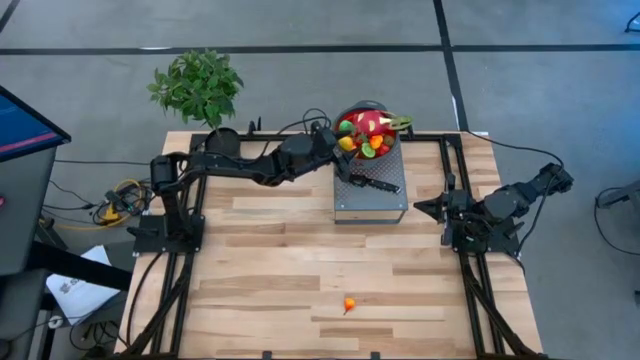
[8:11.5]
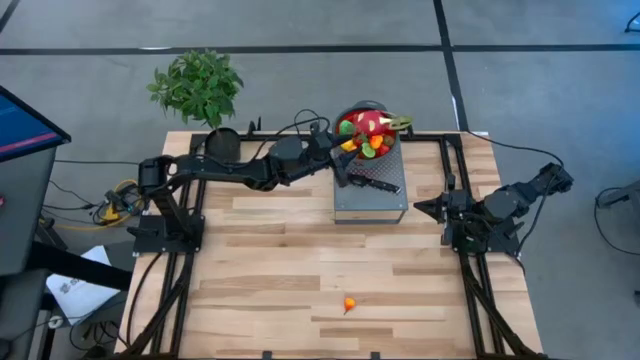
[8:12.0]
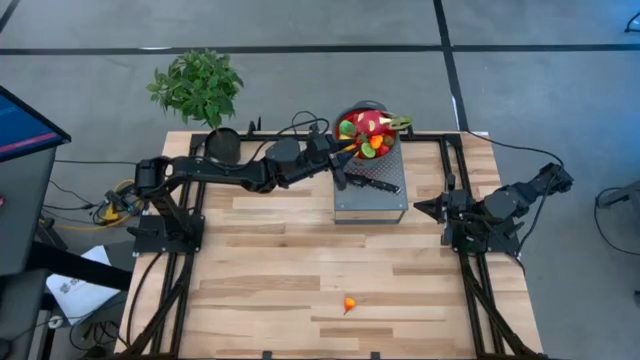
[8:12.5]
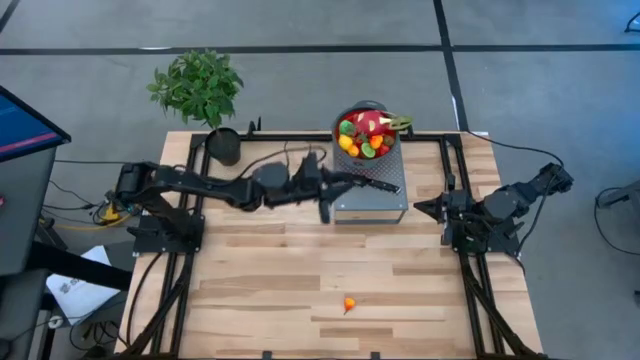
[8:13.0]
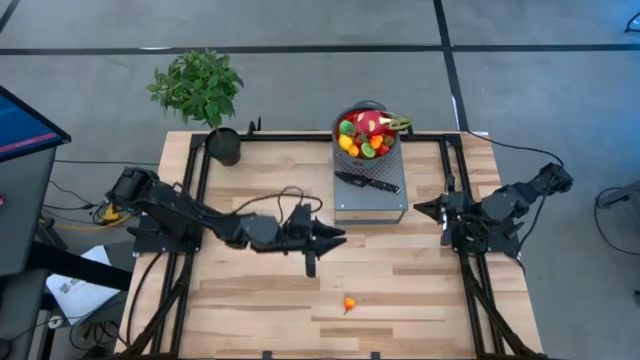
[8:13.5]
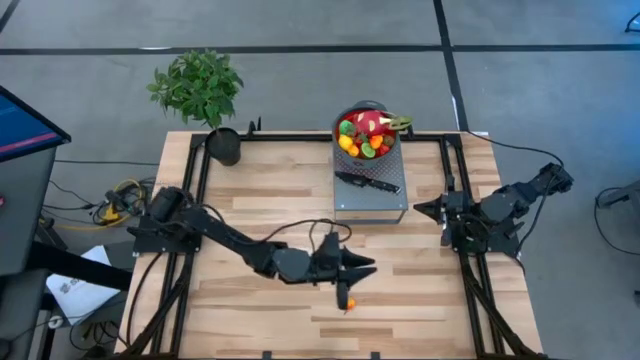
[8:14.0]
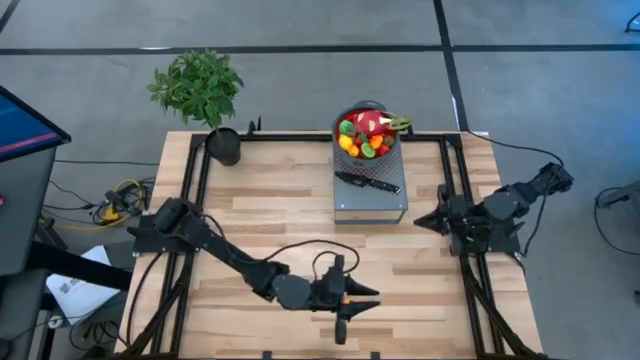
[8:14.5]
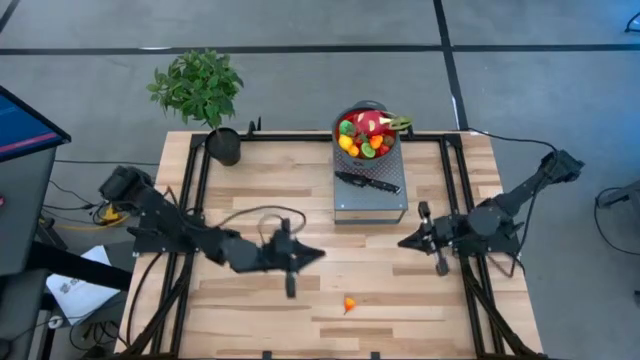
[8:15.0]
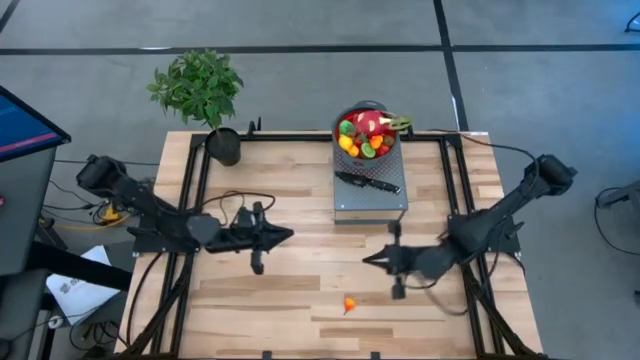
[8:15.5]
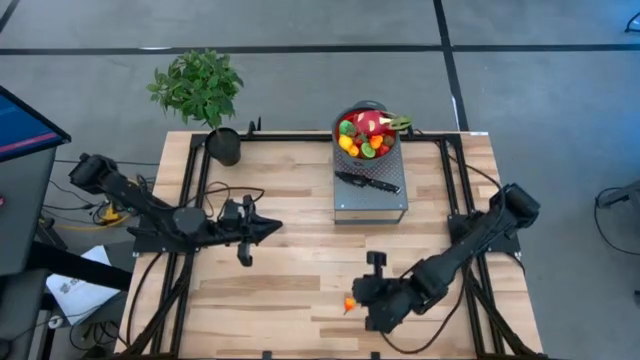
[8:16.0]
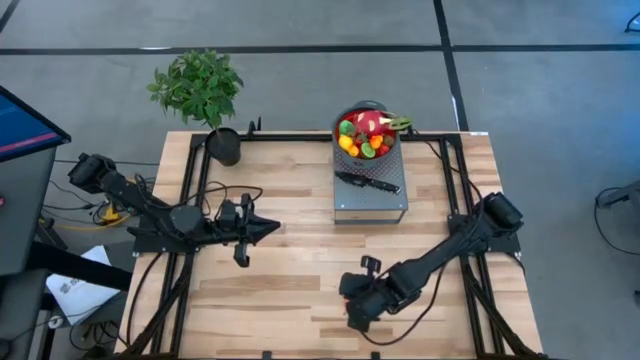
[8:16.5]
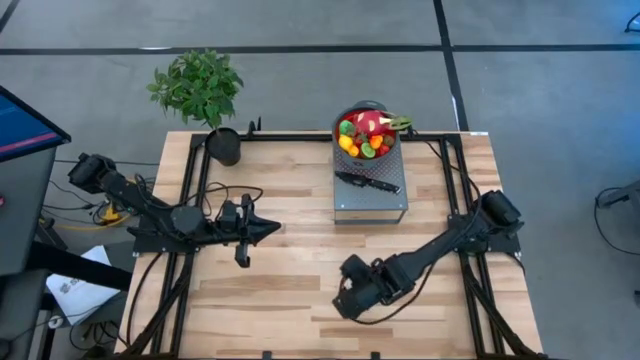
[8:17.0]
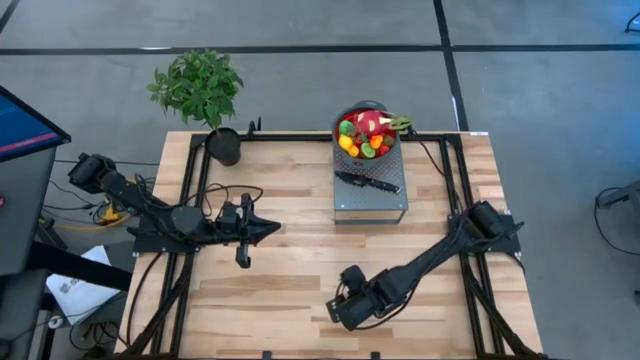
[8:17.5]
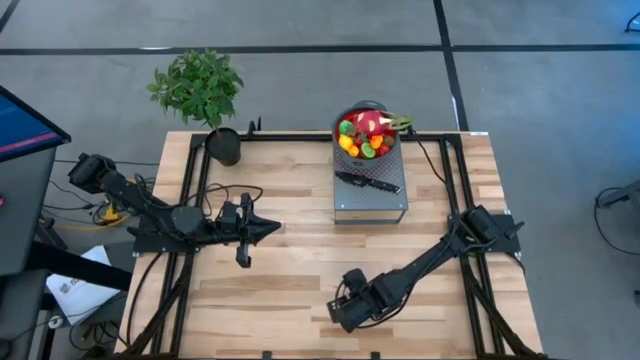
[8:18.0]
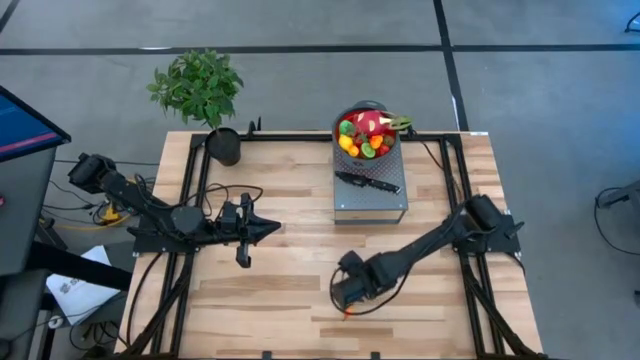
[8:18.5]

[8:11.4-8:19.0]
Task: Pick & Place Fruit
Put the yellow pear into the red colander on the shelf

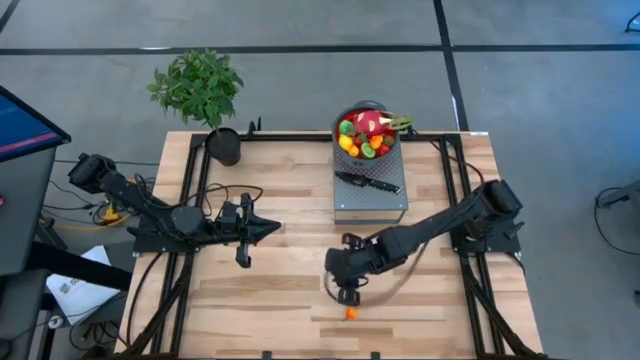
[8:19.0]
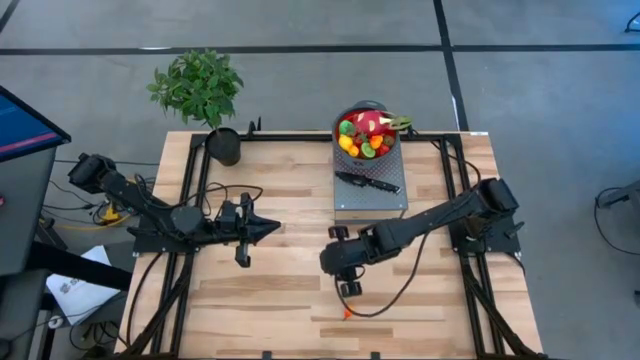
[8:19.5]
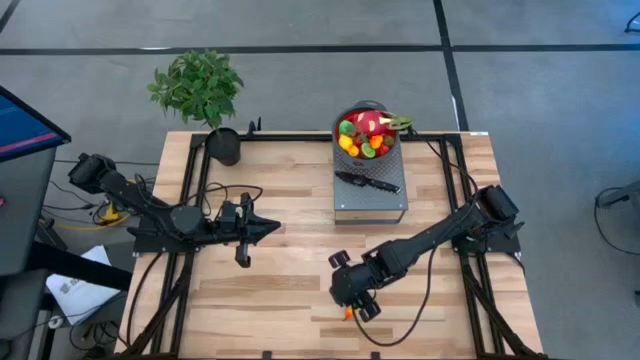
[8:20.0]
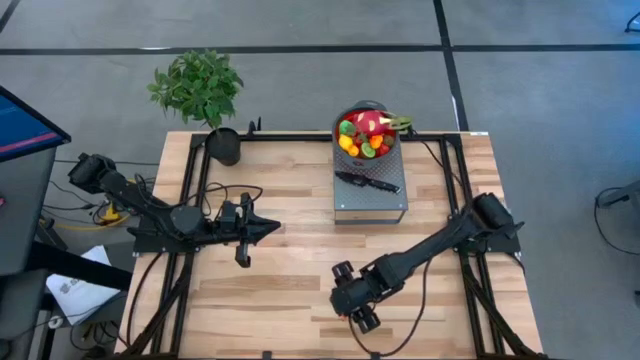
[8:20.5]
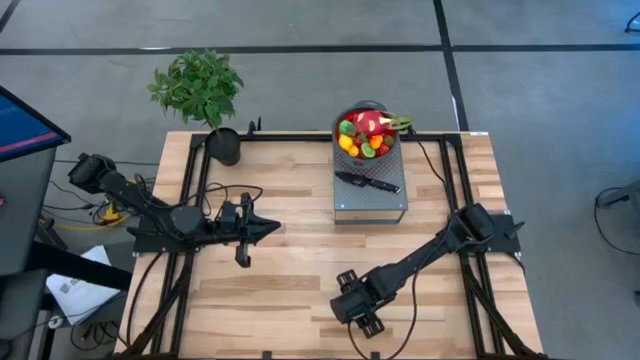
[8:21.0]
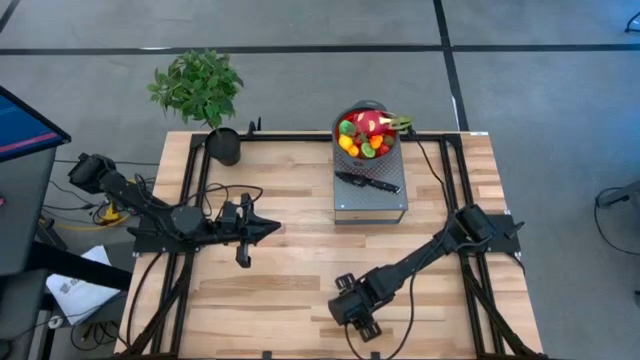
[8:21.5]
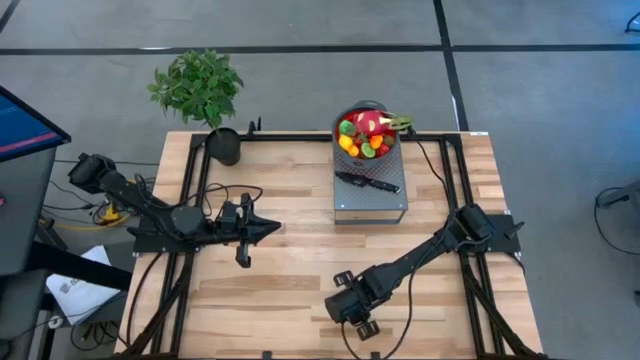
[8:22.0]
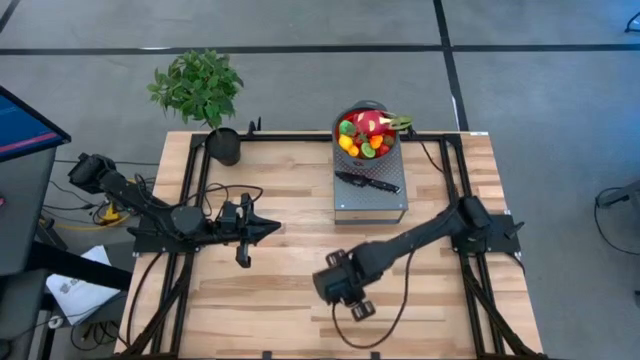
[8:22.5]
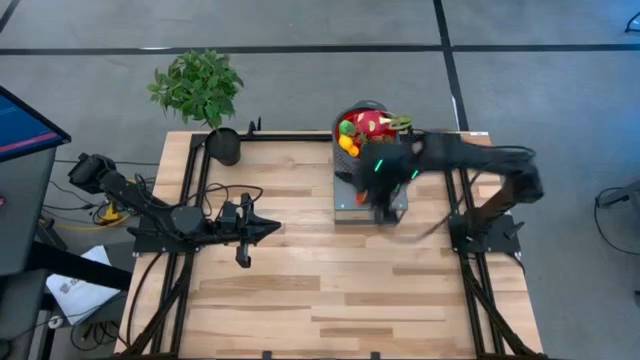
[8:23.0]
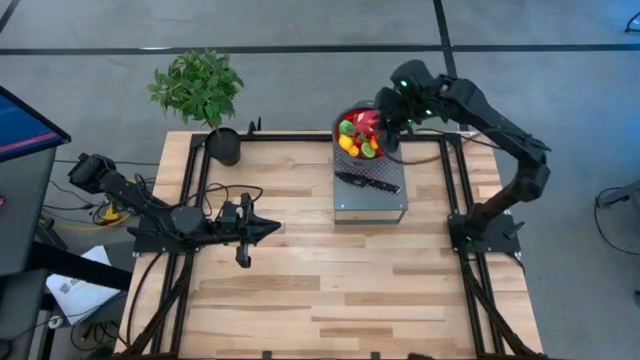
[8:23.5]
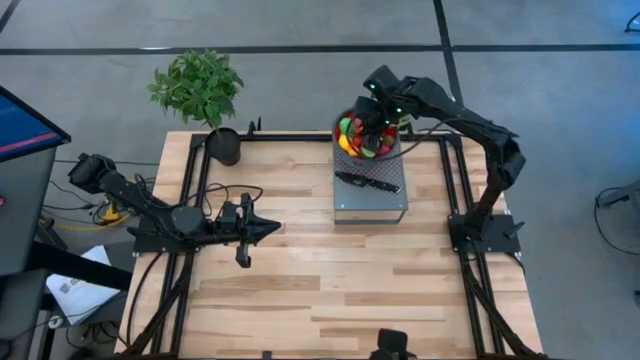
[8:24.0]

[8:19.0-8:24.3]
Put the yellow pear into the red colander on the shelf

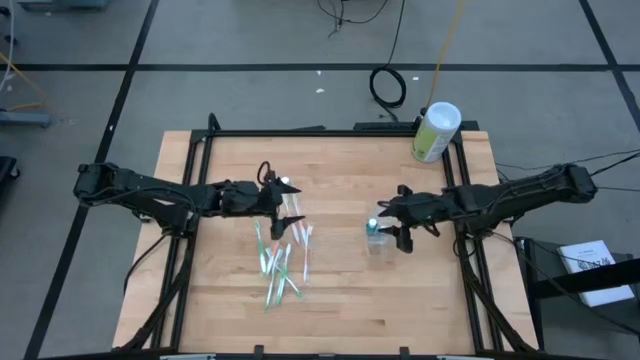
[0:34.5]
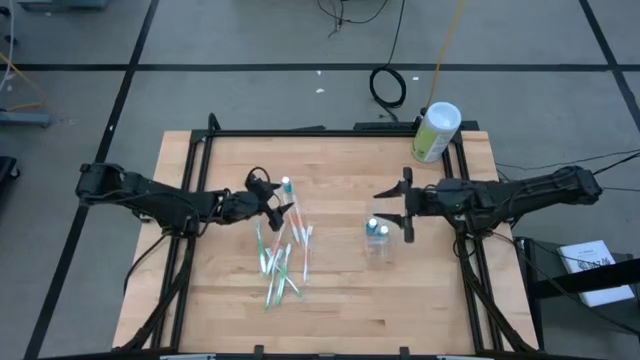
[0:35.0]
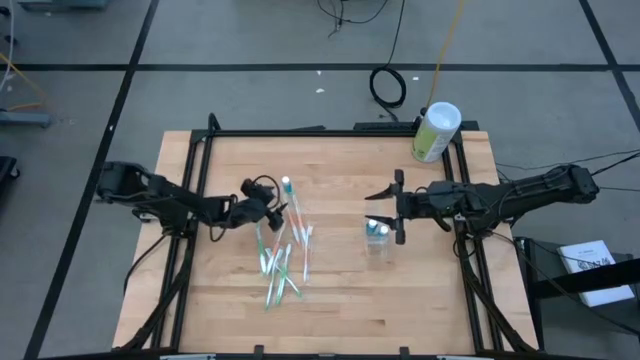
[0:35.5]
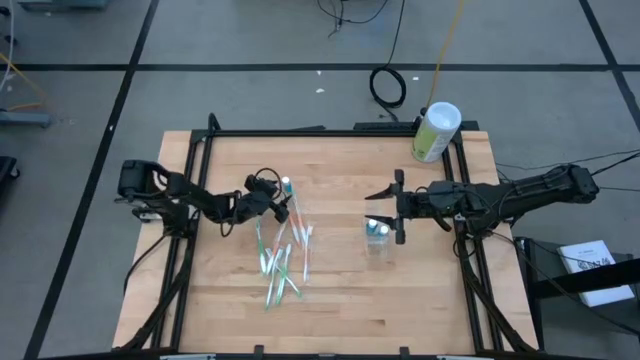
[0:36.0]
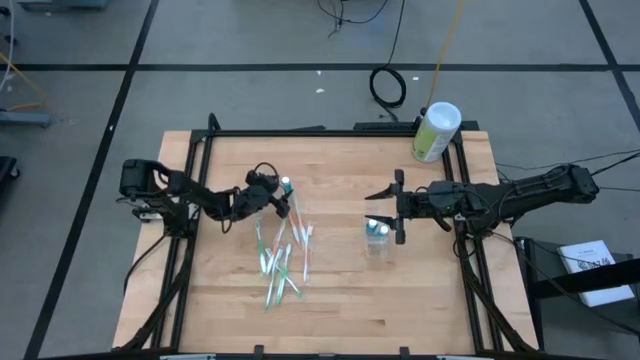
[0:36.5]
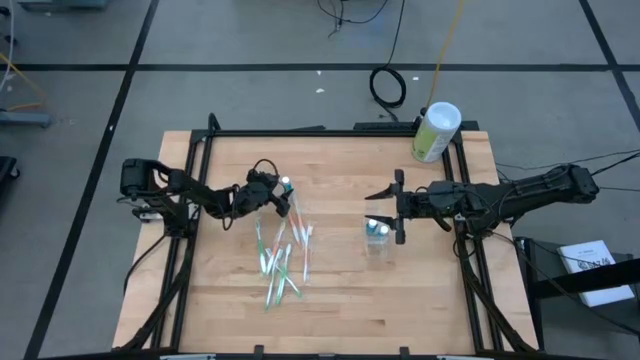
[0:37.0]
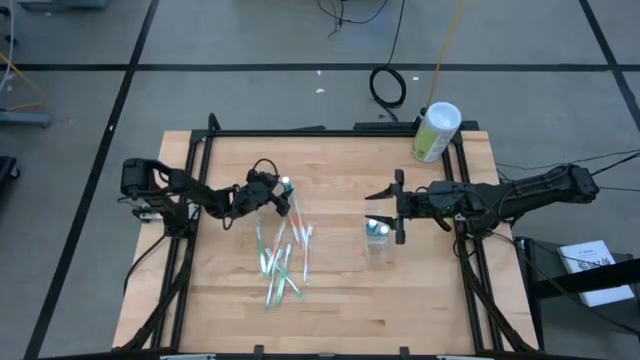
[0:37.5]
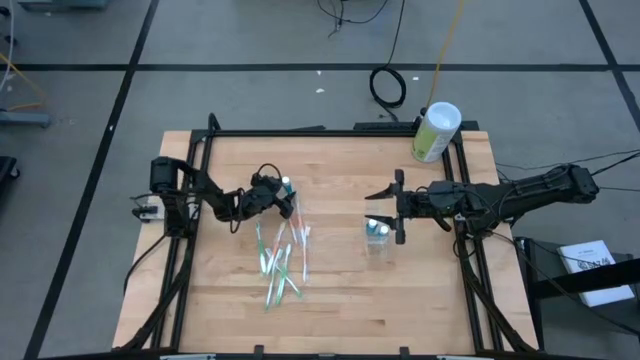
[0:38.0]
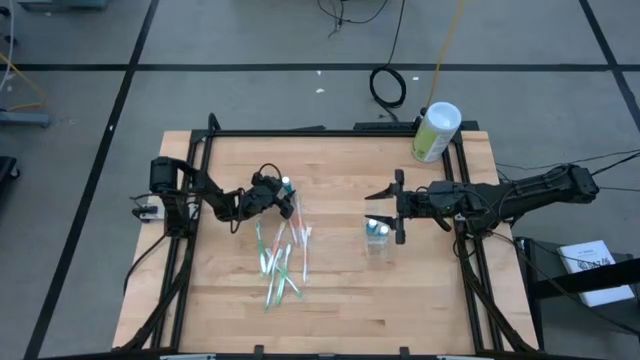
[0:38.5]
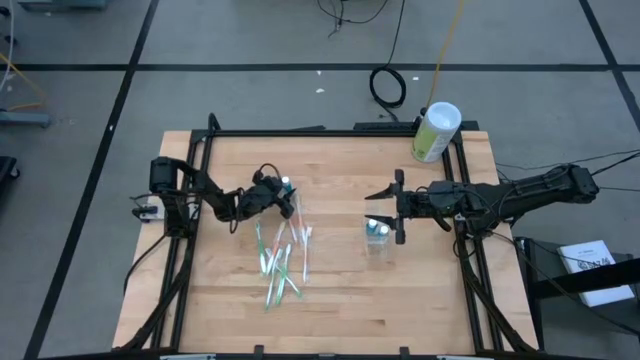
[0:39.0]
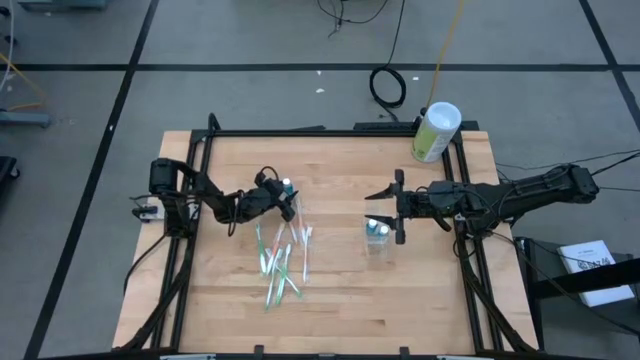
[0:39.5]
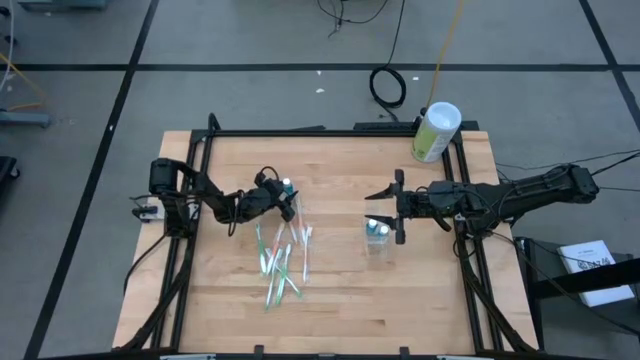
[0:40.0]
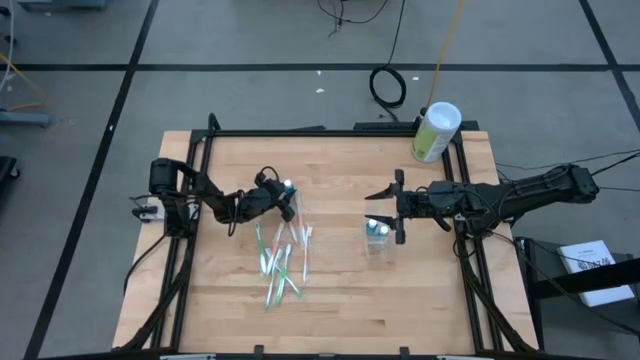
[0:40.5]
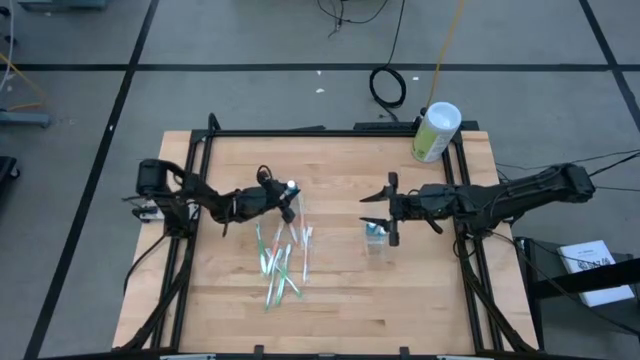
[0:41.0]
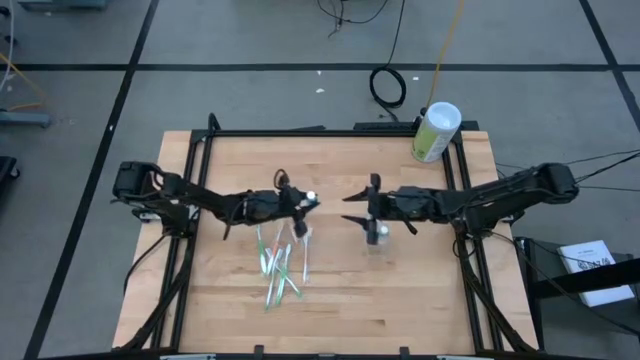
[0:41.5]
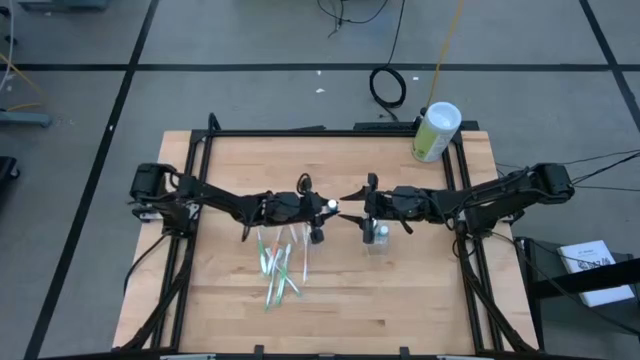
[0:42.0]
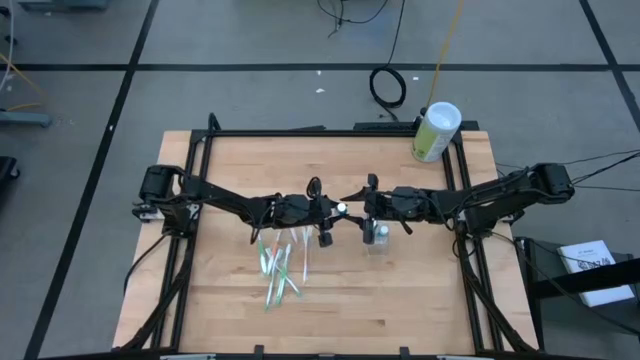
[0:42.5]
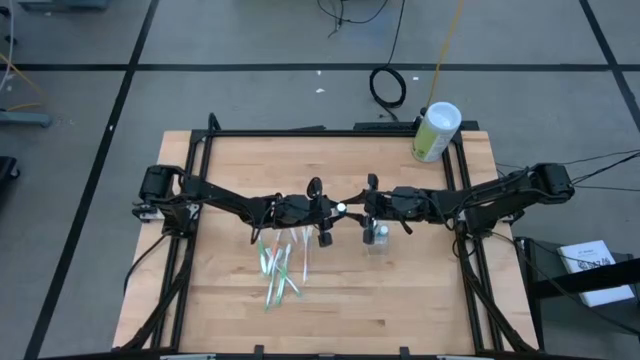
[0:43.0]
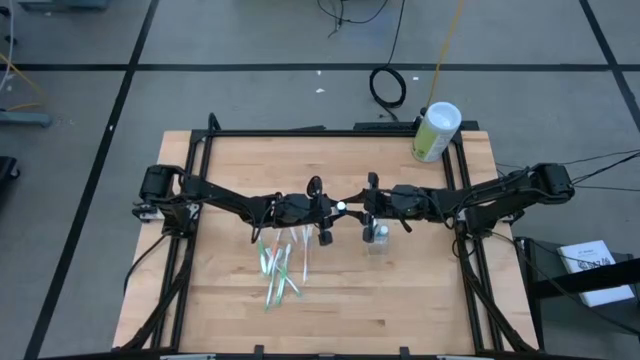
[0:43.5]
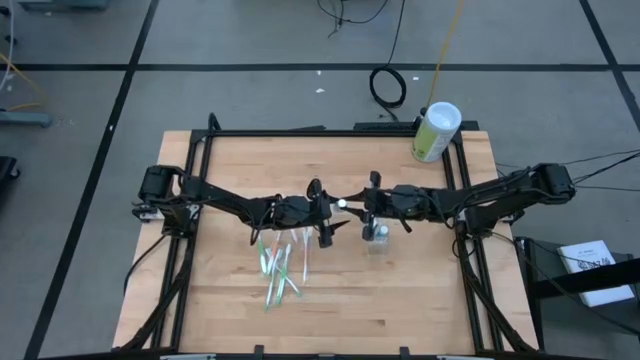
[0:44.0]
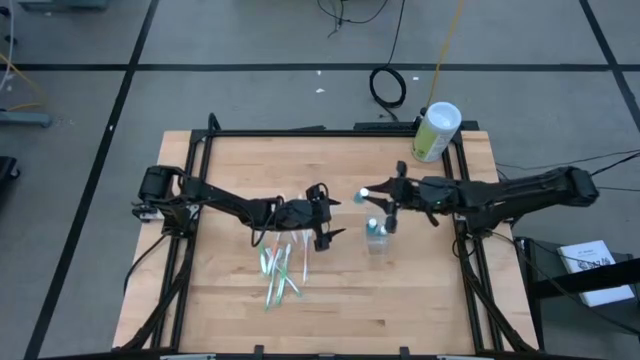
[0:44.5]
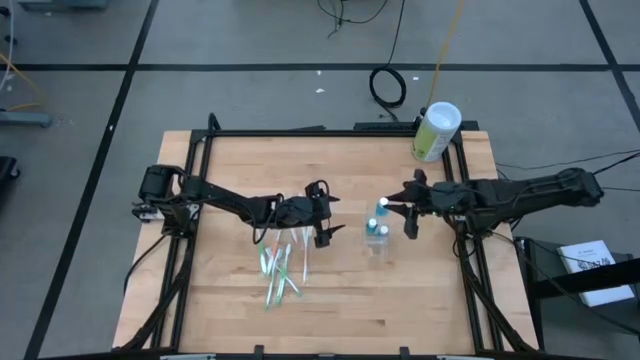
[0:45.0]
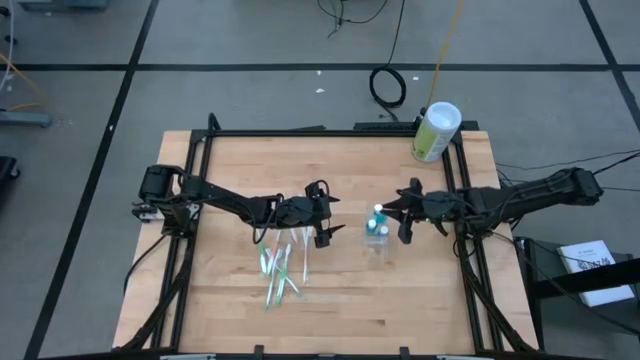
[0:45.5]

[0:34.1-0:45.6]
Task: Pick & Place toothbrushing station
Put the blue mouthwash into the middle of the transparent organizer
